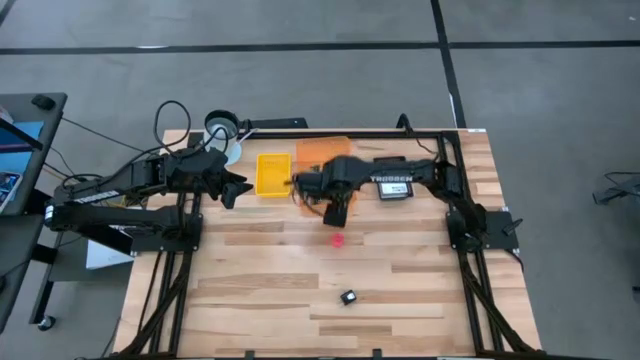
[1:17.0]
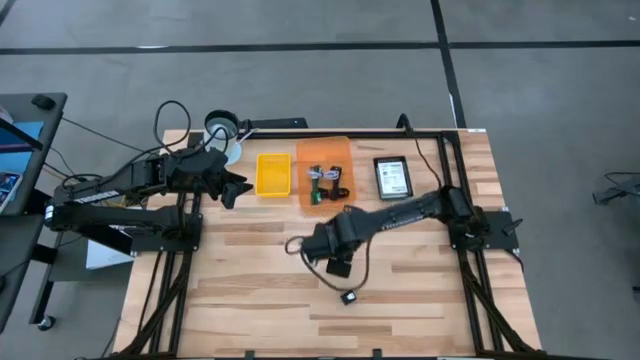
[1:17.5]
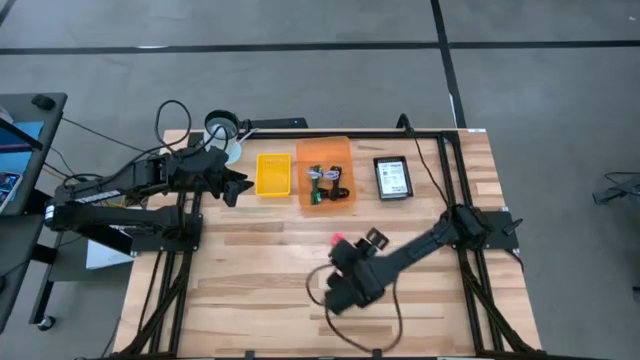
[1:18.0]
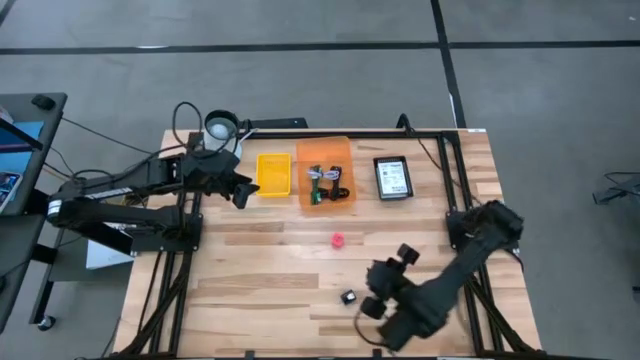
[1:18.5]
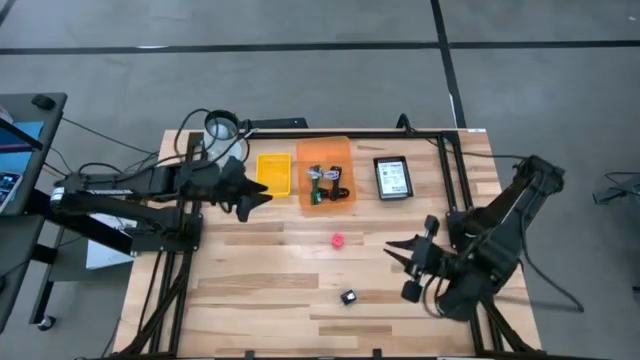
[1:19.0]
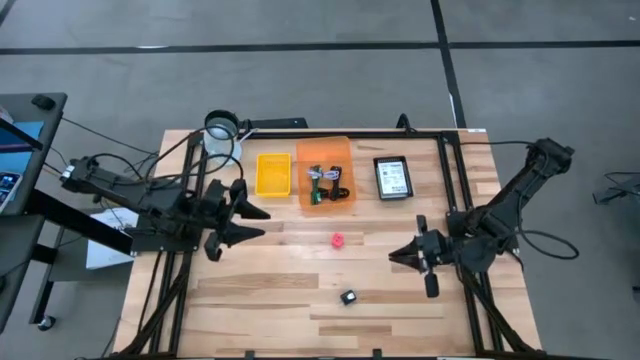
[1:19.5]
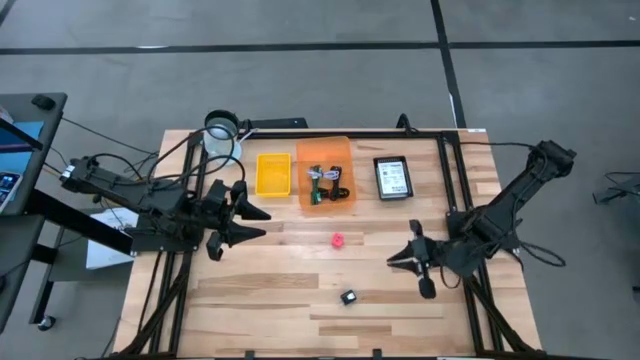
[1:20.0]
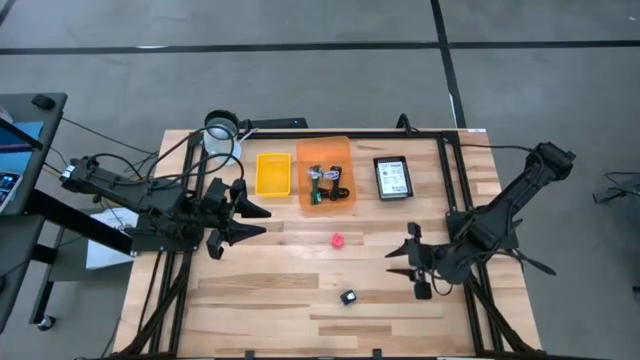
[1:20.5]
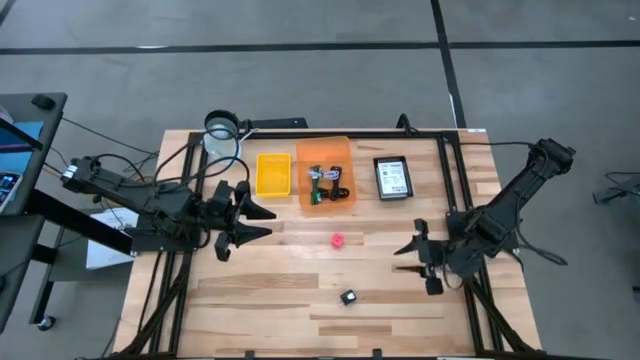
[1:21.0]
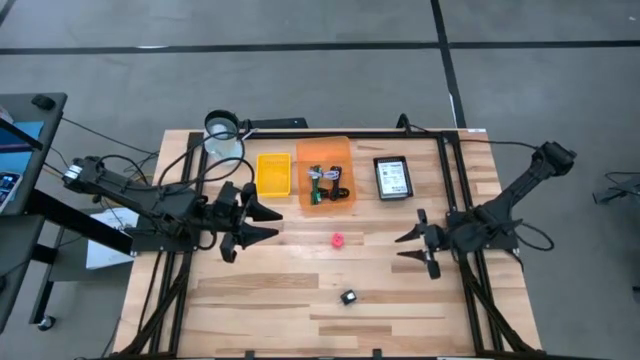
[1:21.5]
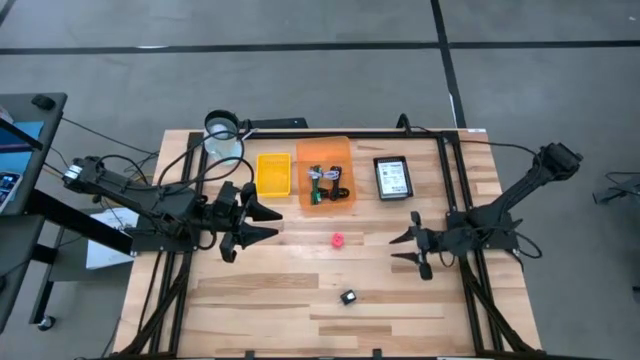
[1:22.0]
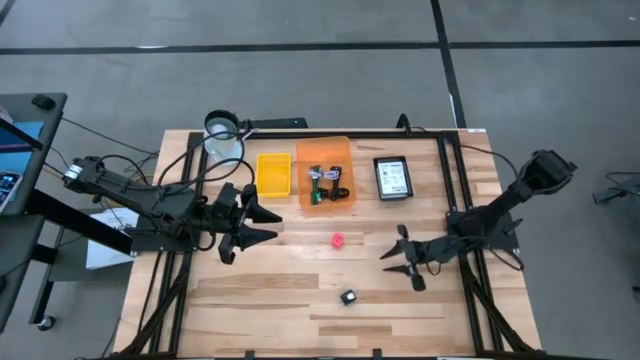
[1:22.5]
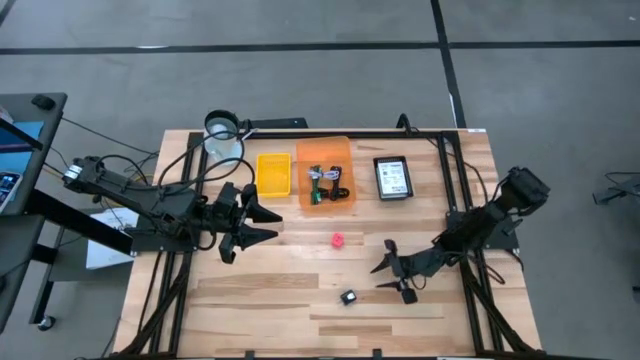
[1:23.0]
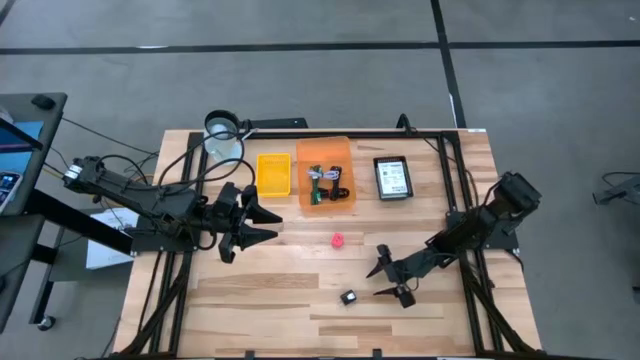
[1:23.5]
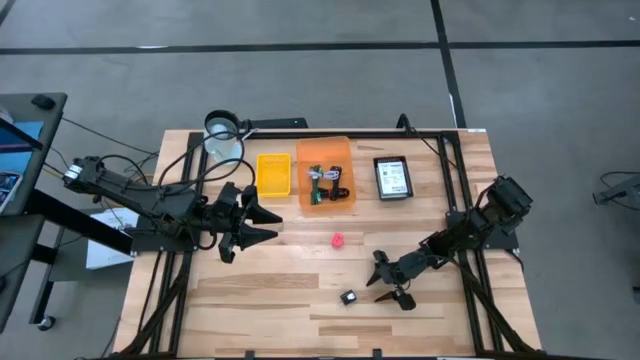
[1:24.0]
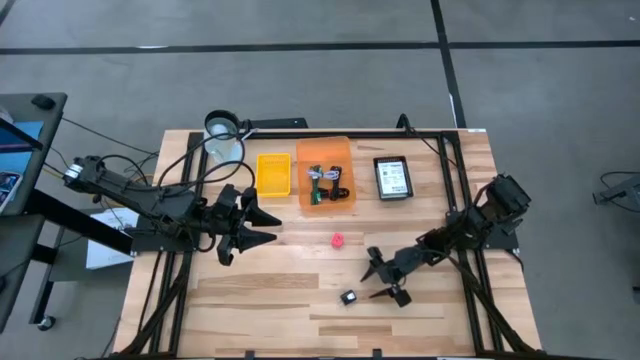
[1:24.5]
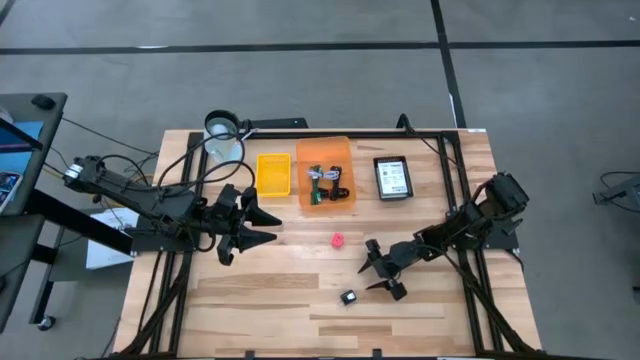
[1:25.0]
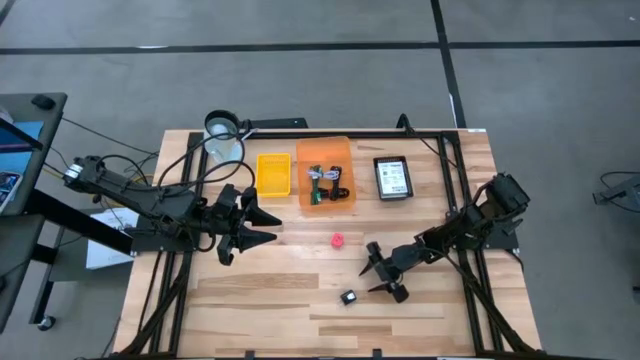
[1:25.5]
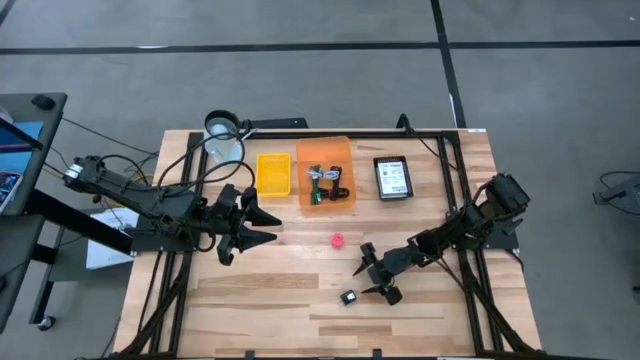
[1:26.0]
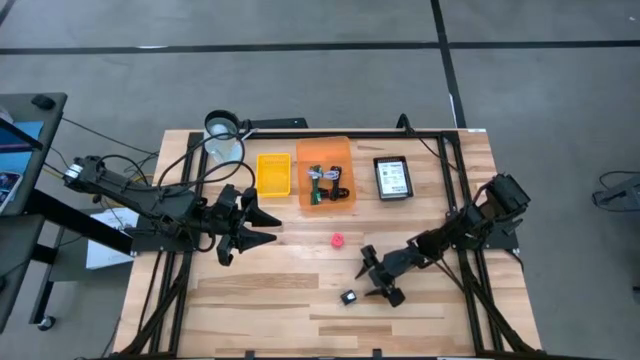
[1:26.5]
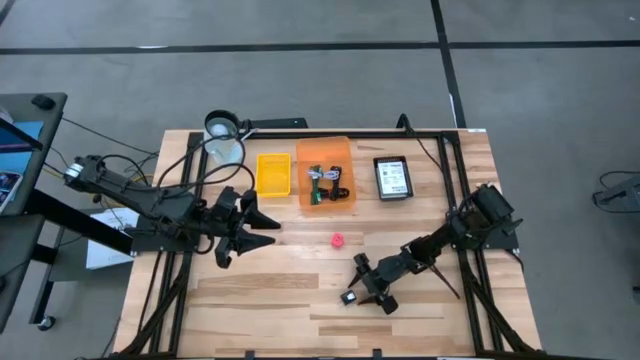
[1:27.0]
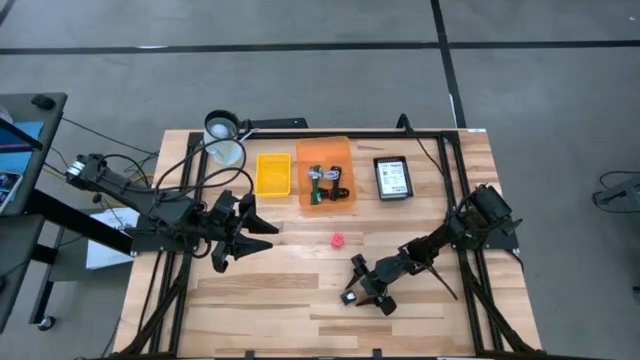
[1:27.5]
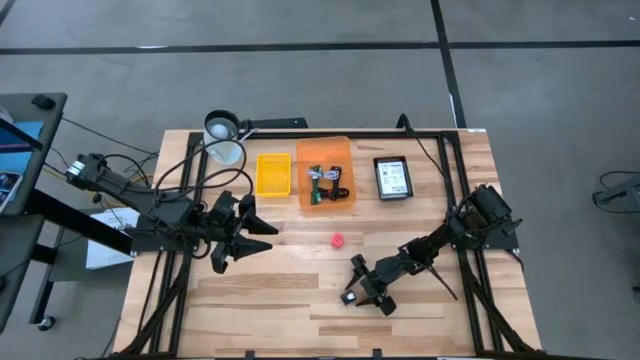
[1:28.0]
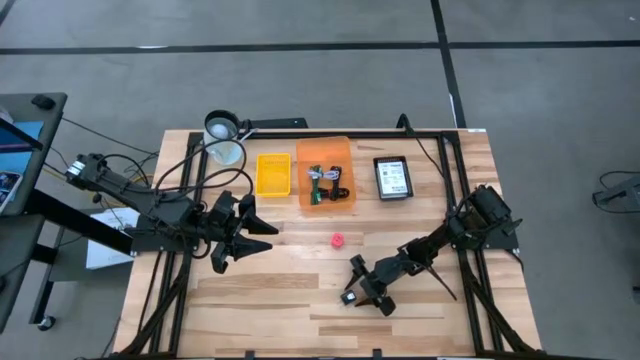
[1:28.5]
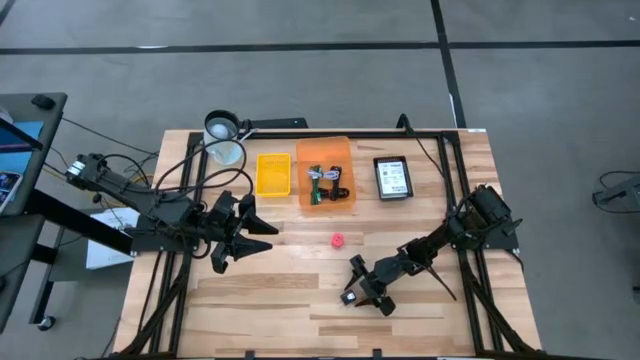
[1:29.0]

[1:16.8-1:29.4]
Task: Pick and place items into bin
Put the black charger adapter into the yellow bin

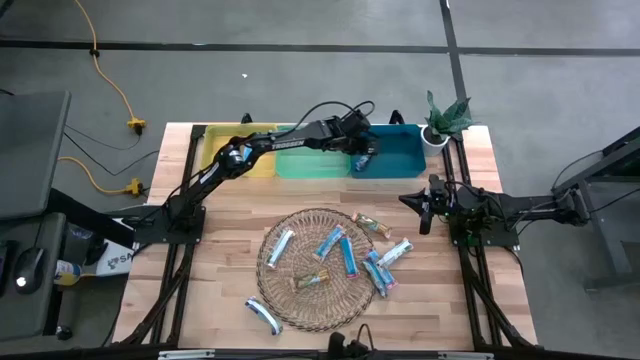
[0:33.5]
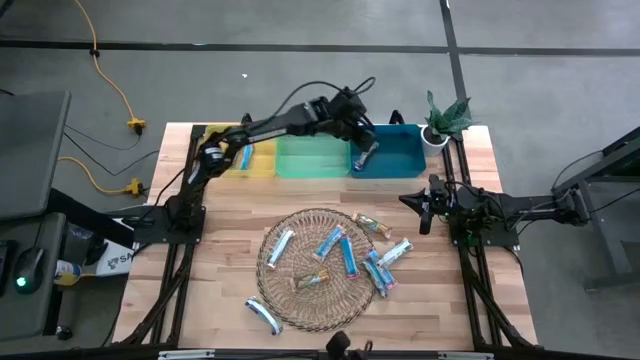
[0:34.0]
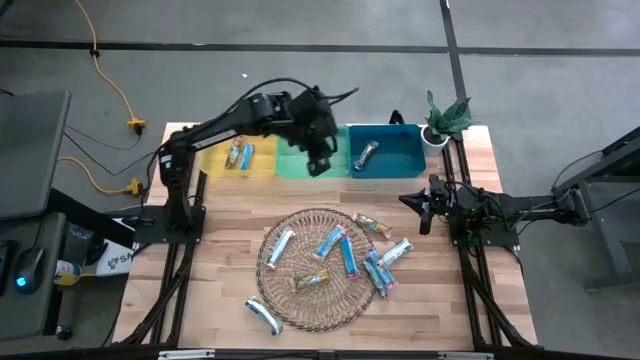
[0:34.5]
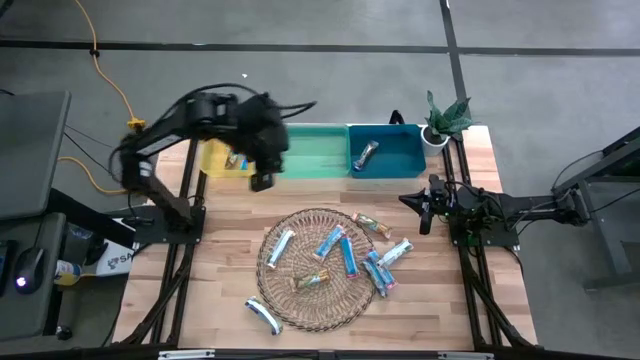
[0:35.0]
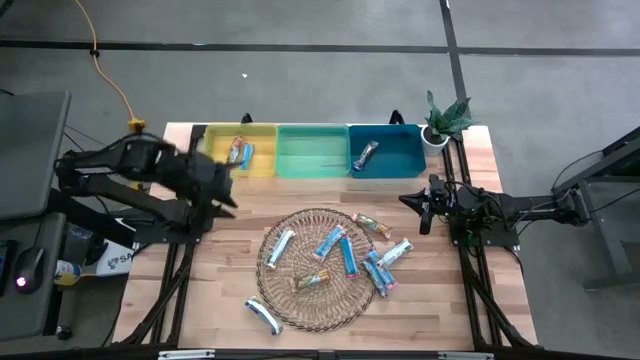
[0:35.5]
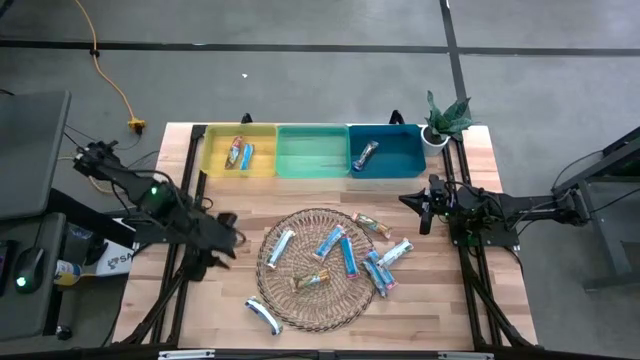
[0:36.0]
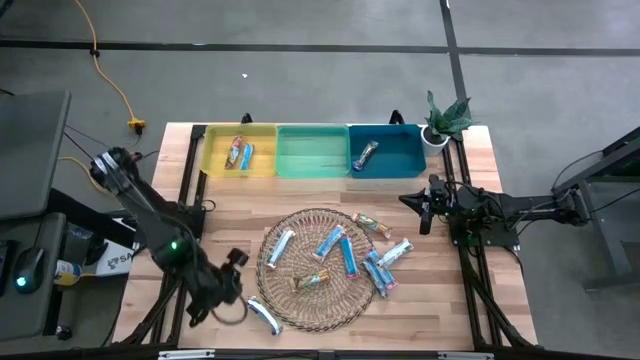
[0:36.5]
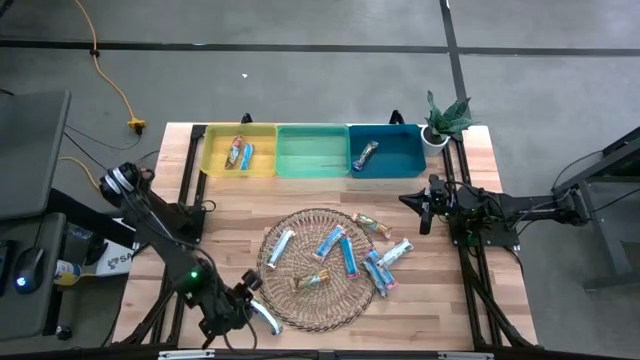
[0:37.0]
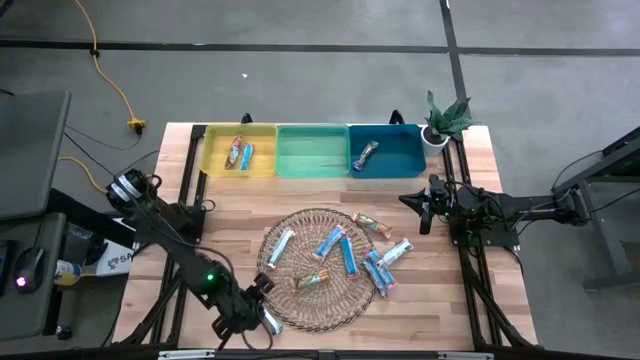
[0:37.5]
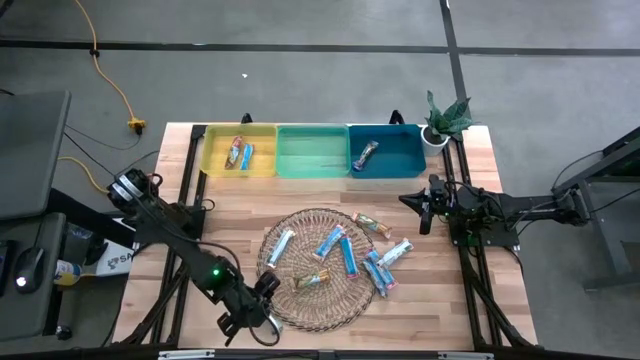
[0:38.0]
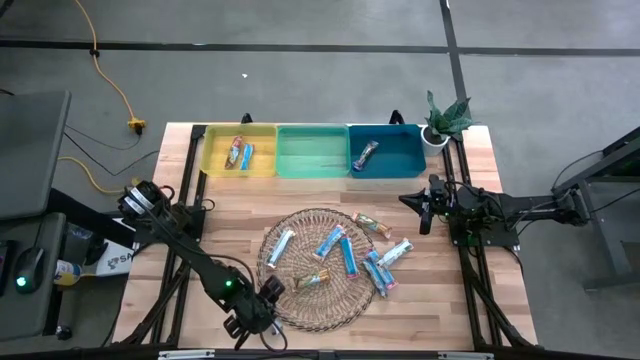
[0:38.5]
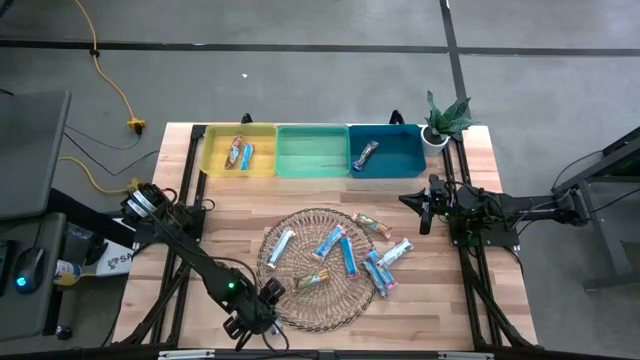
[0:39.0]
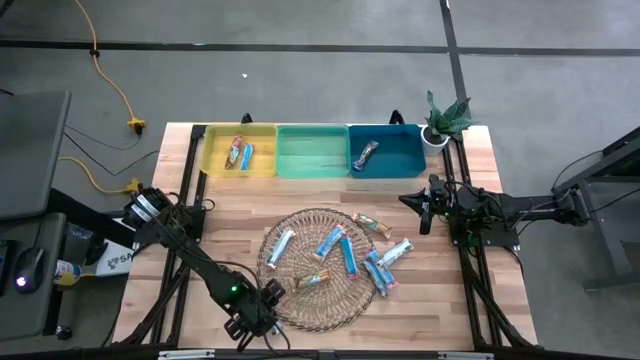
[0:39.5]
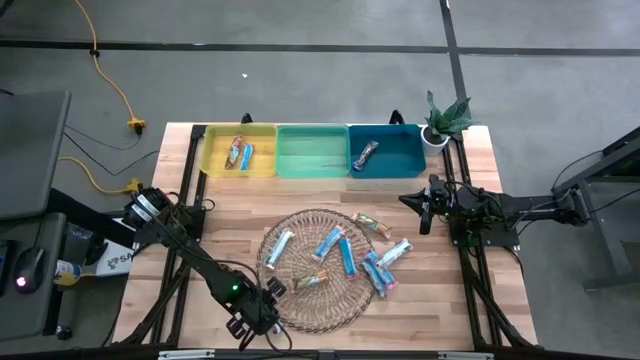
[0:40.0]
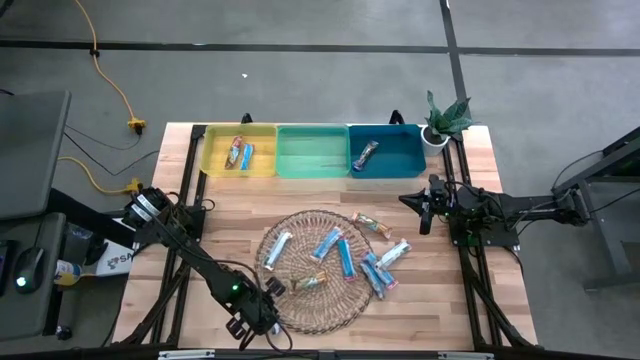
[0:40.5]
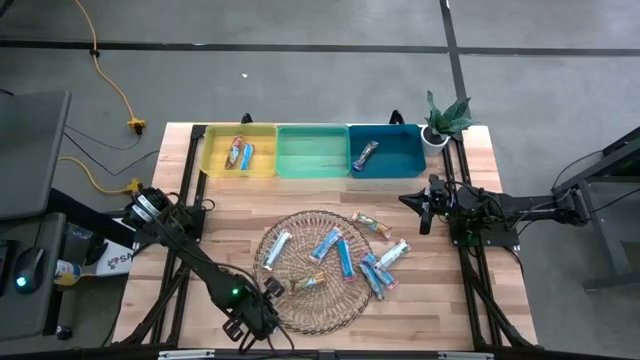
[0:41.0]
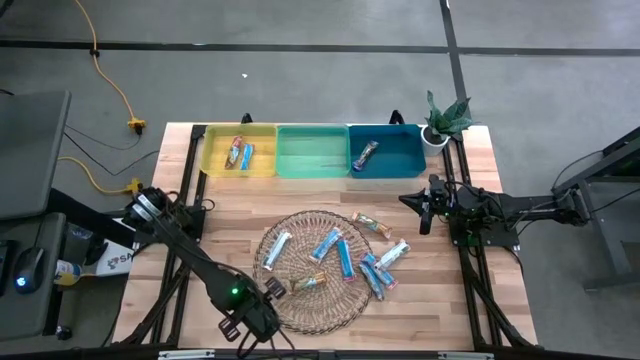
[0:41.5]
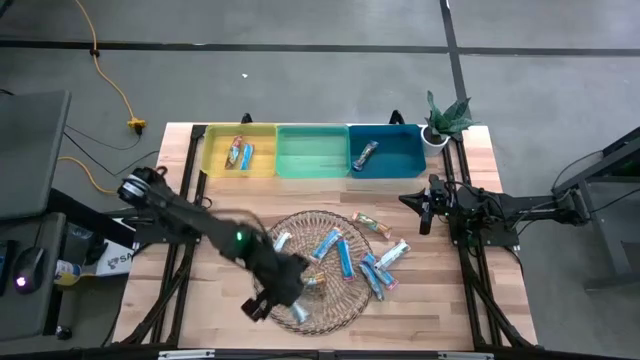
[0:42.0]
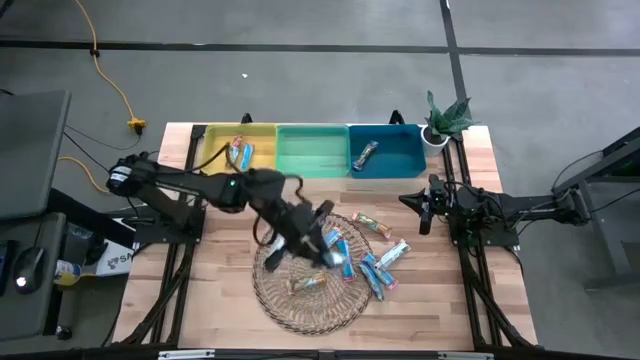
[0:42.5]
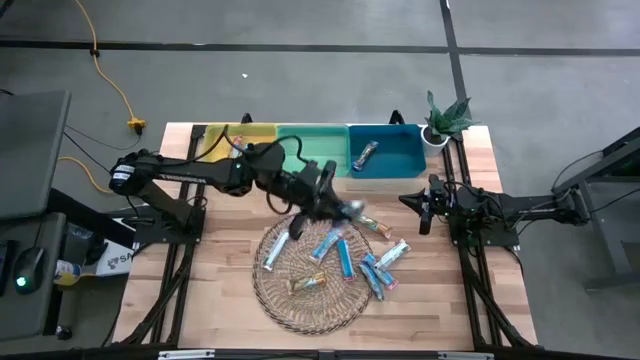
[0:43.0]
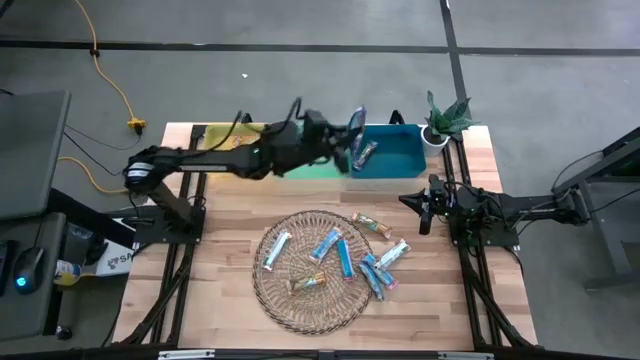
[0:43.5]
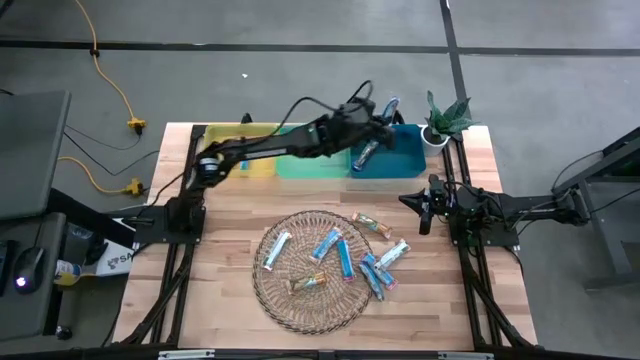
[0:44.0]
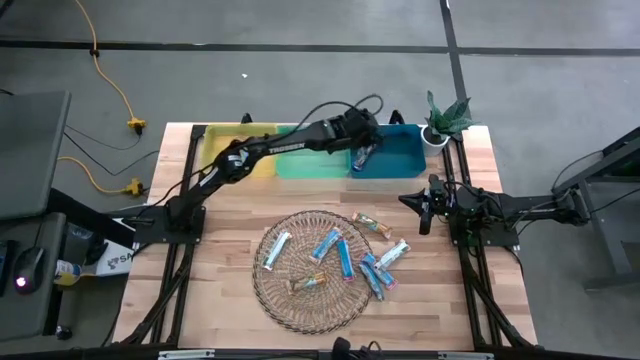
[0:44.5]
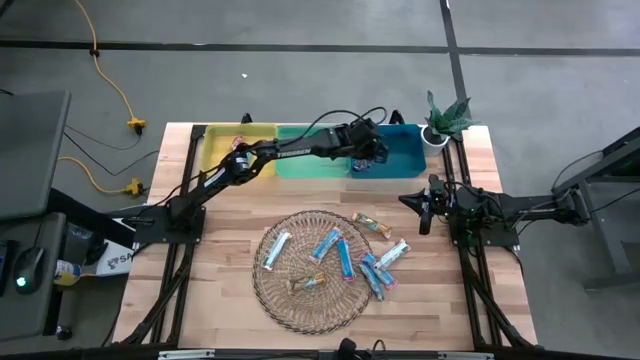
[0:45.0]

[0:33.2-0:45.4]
Task: Pick and place Granola Bars by type
Put the bottom blue granola bar into the blue bin
